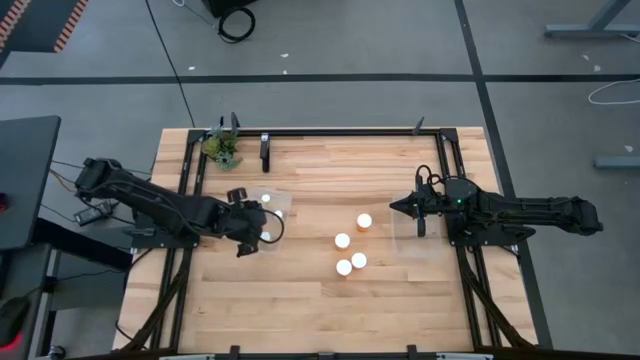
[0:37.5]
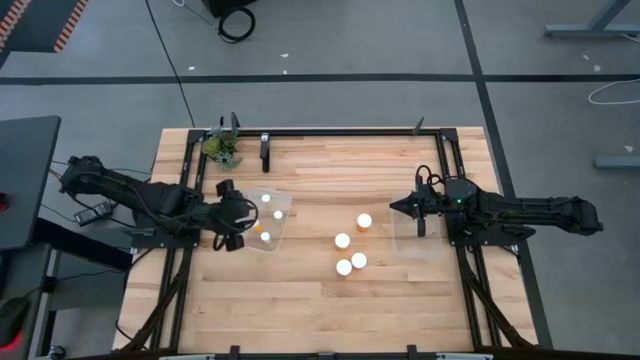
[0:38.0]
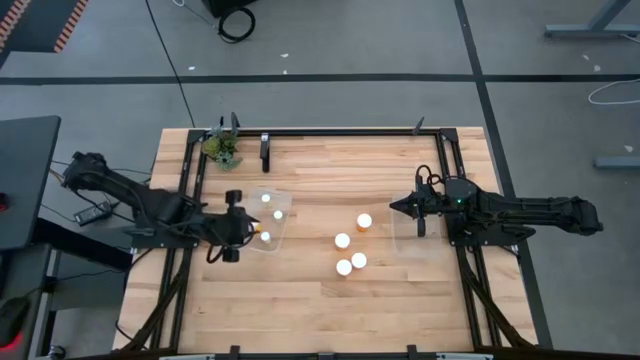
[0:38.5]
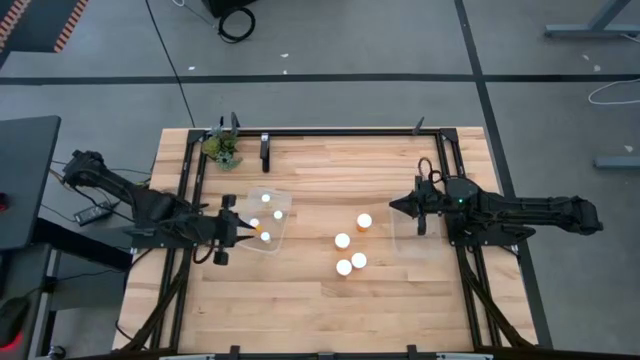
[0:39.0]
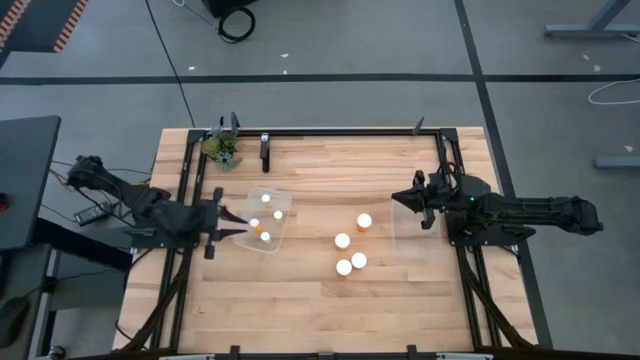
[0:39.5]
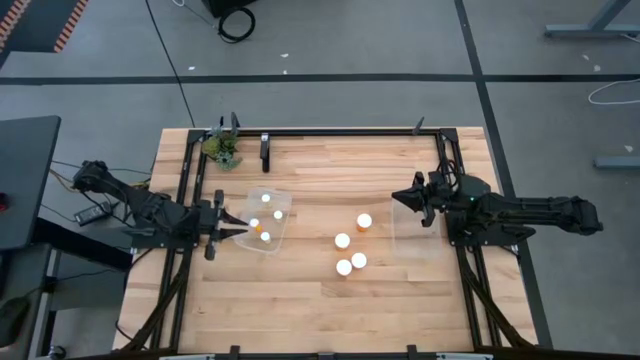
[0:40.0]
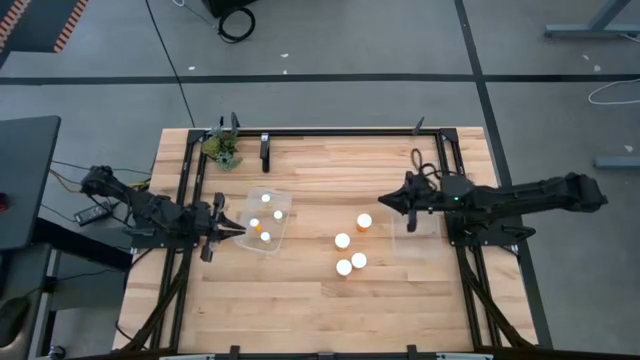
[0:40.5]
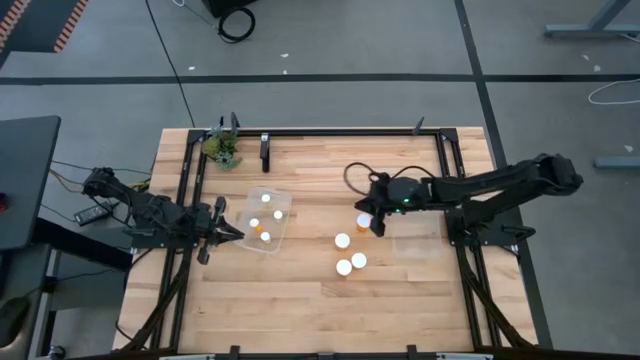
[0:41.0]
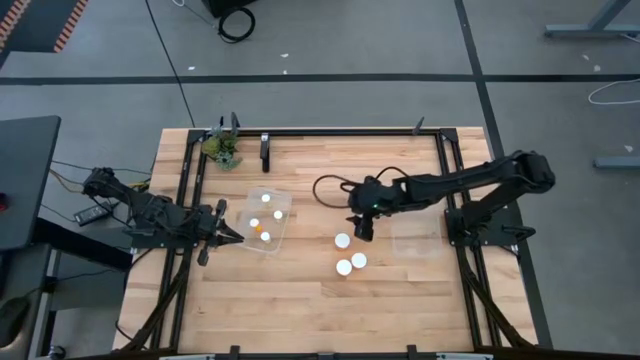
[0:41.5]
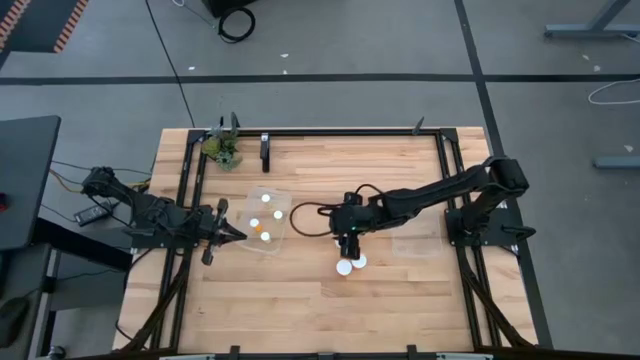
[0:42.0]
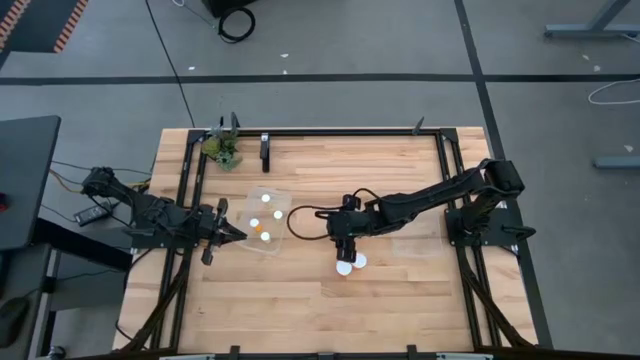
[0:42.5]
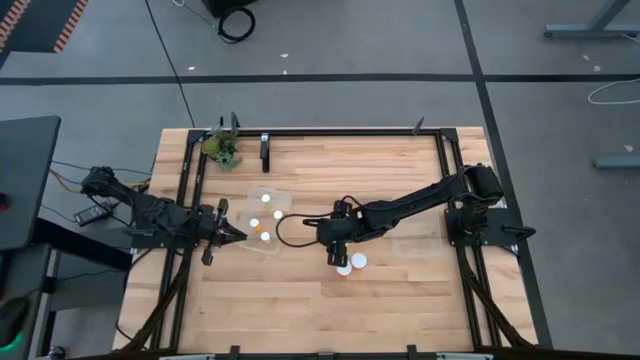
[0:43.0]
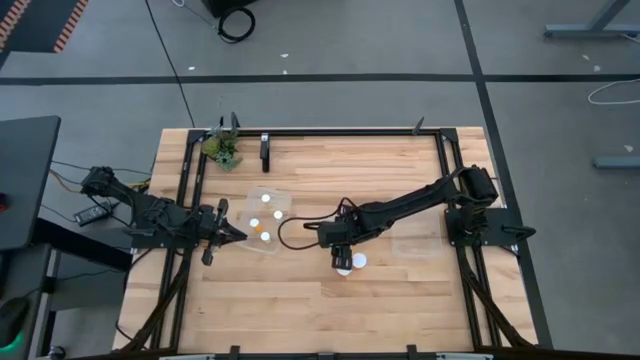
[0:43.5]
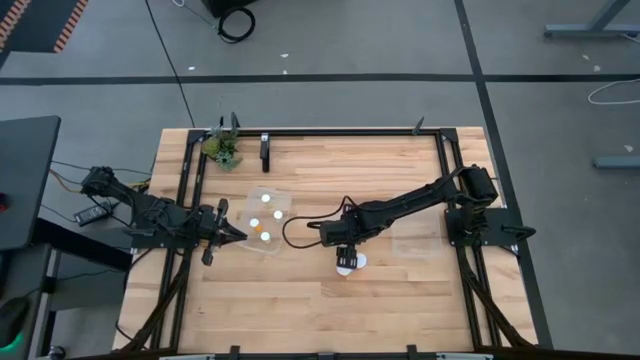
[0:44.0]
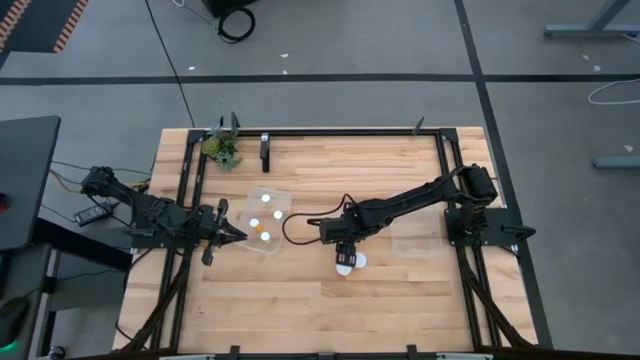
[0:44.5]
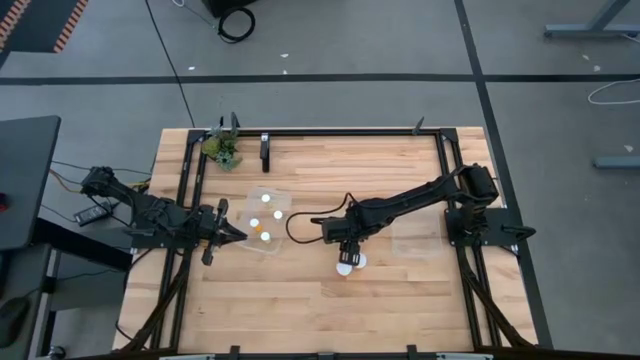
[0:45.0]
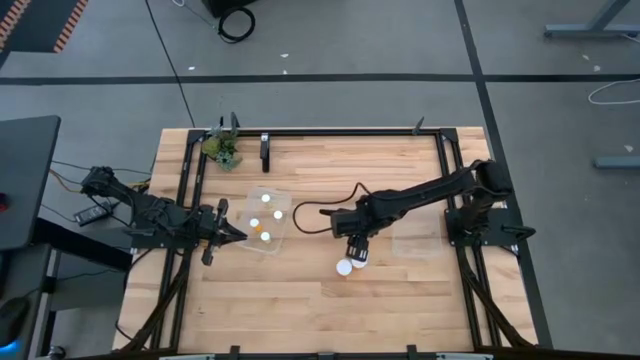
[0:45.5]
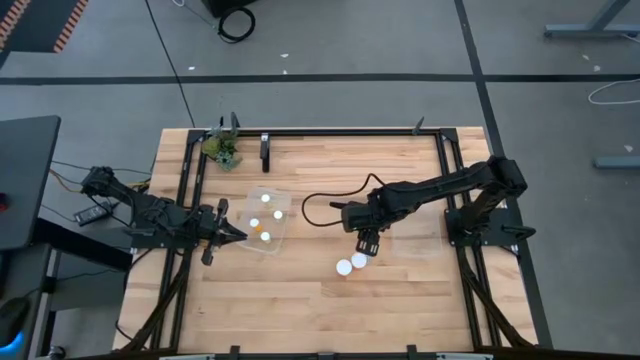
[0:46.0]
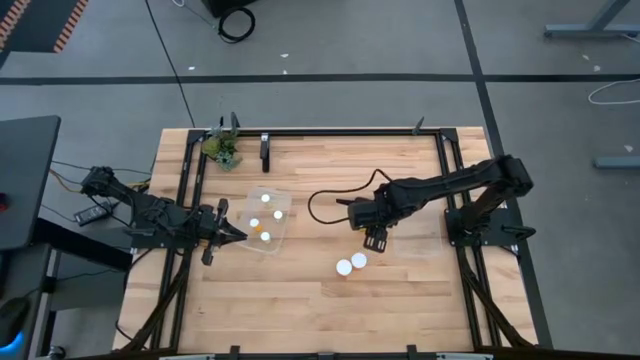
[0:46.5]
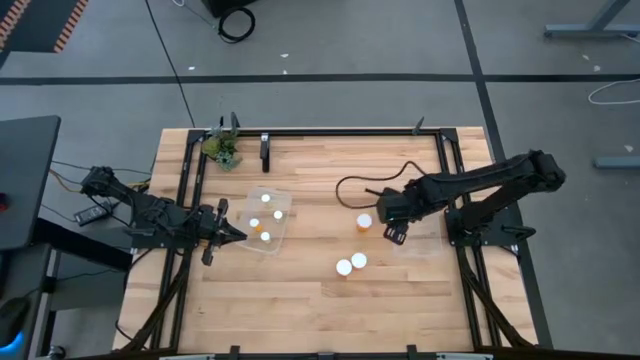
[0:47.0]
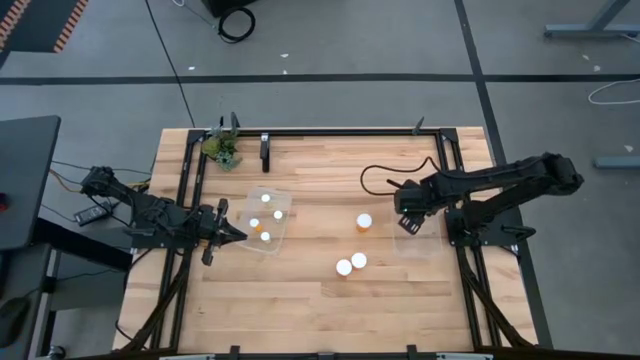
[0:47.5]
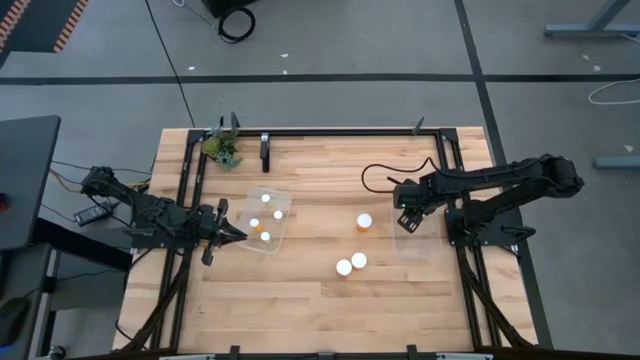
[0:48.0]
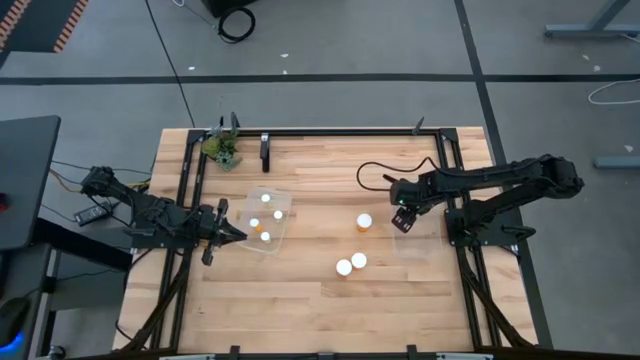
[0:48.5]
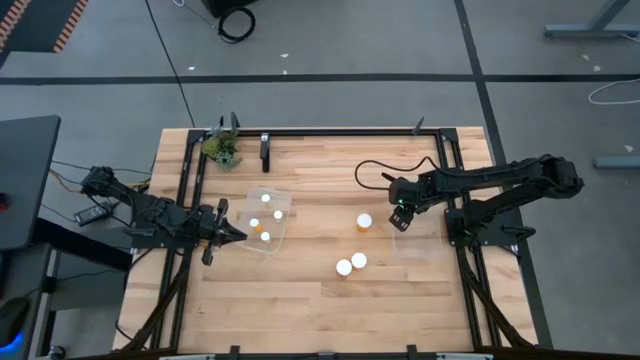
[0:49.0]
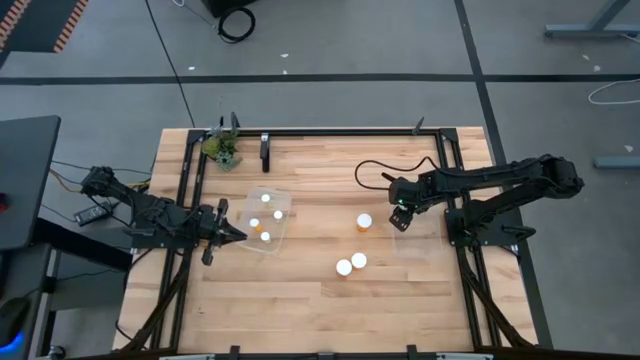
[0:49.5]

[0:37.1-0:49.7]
Task: Pick and place medicine bottles into bin by pill shape (circle, oval)
Put the orange capsule bottle into the right transparent bin

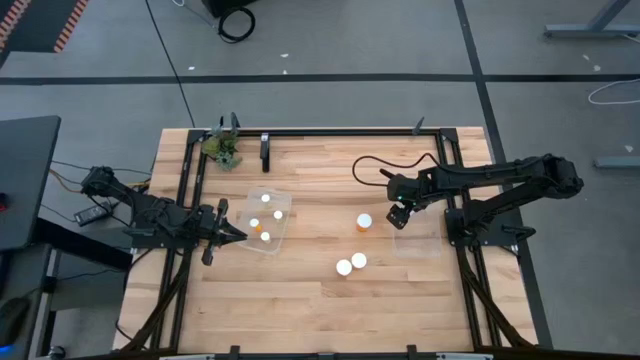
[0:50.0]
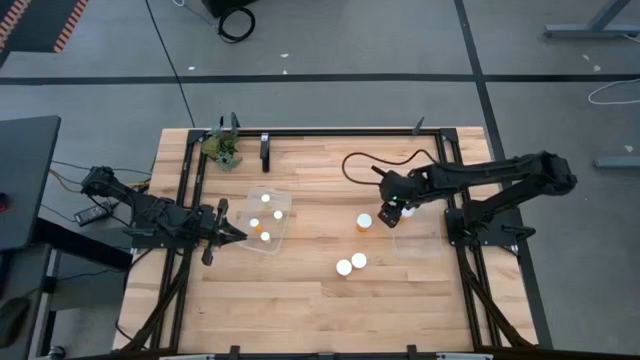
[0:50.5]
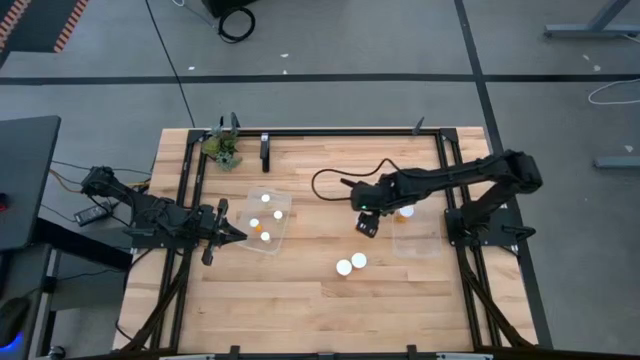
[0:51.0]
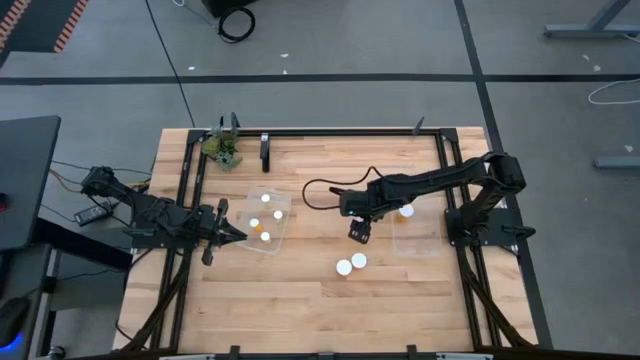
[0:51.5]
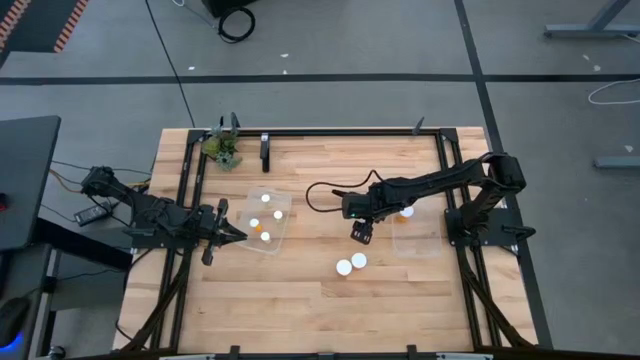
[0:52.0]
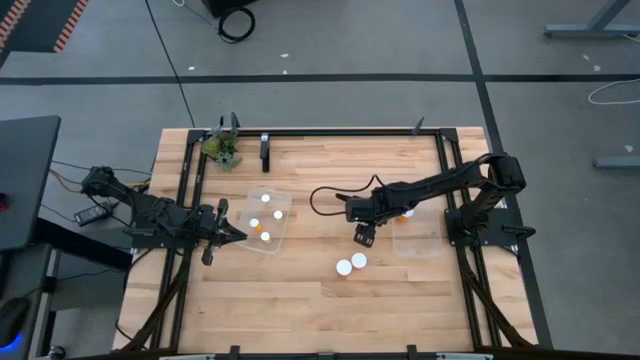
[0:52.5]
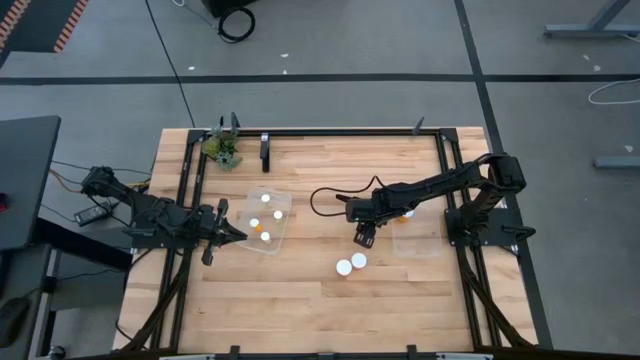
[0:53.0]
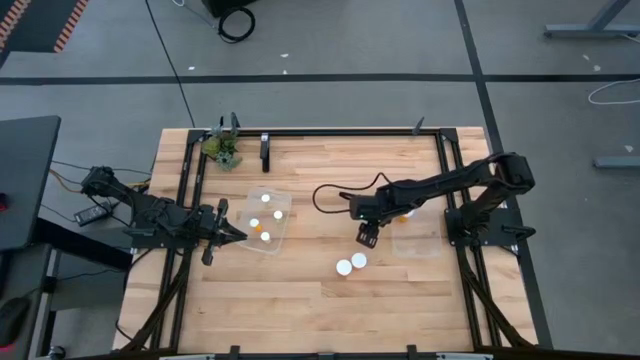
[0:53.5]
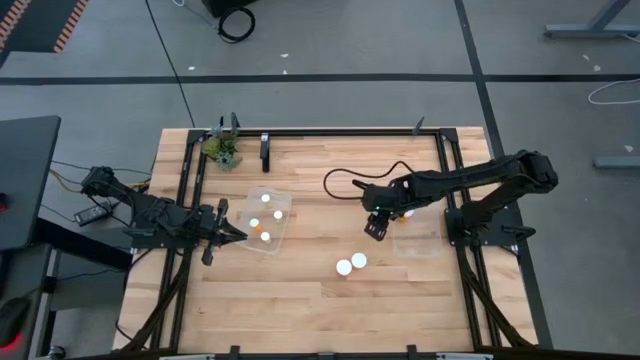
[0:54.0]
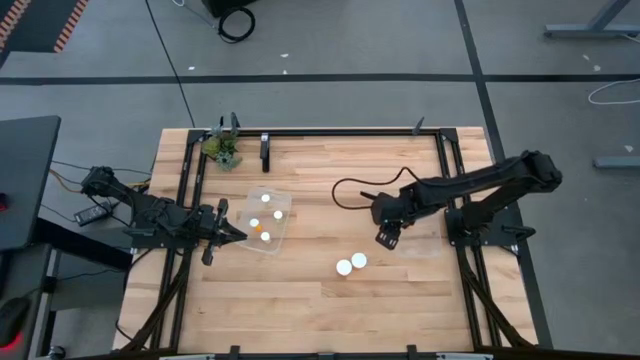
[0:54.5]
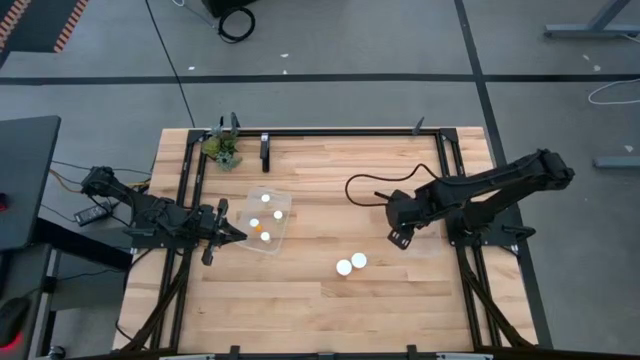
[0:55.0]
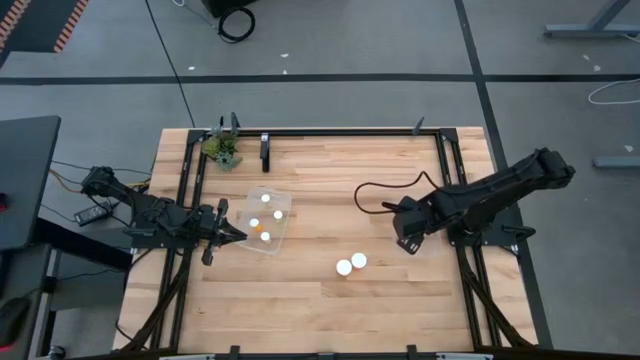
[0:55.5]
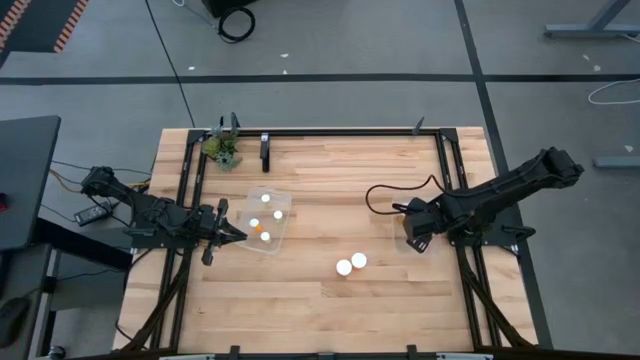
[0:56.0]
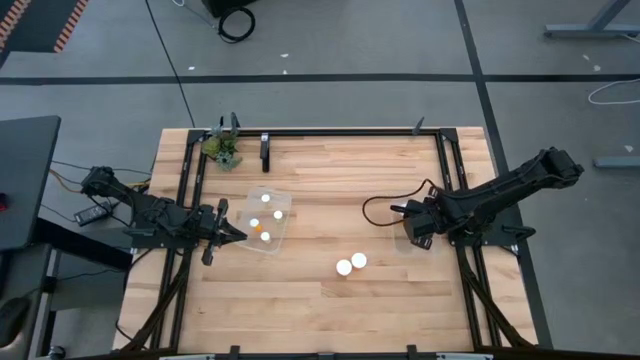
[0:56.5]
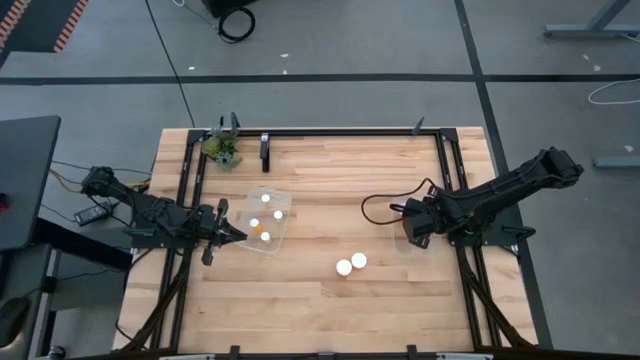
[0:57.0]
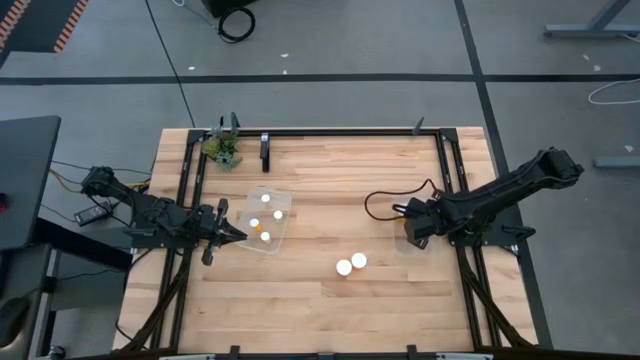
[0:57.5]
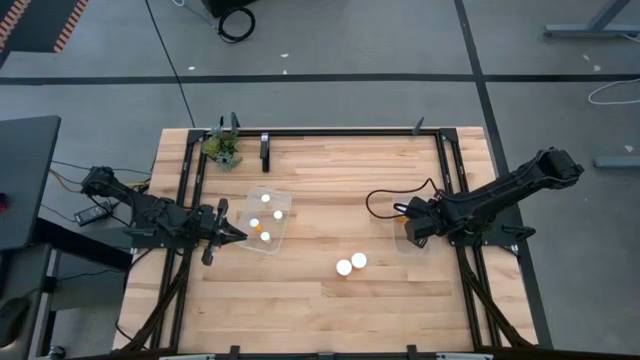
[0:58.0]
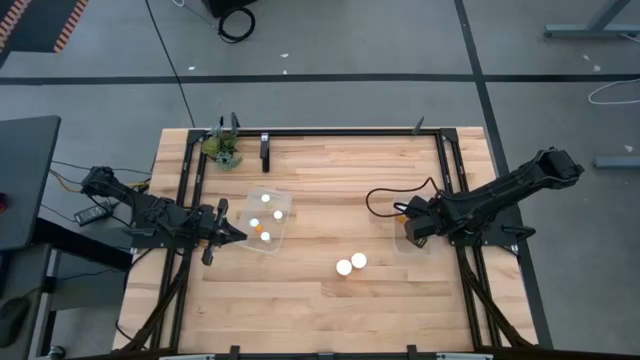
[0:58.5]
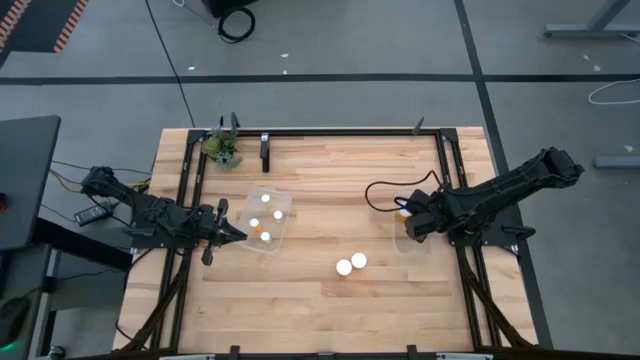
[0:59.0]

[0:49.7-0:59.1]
Put the orange capsule bottle into the right transparent bin
